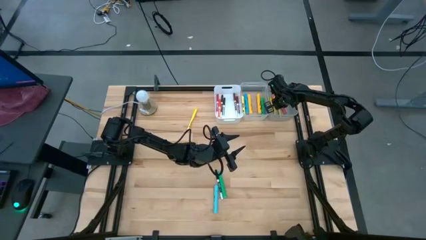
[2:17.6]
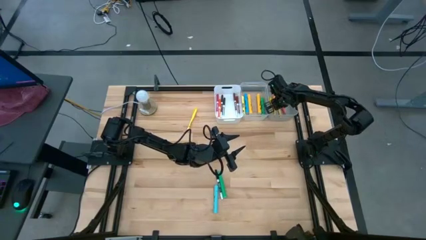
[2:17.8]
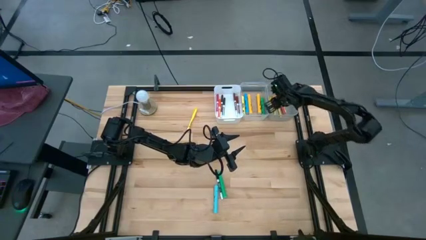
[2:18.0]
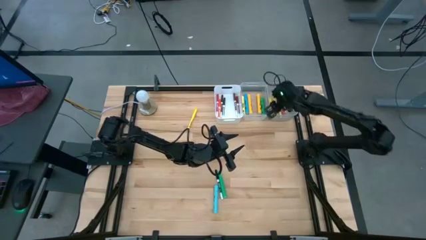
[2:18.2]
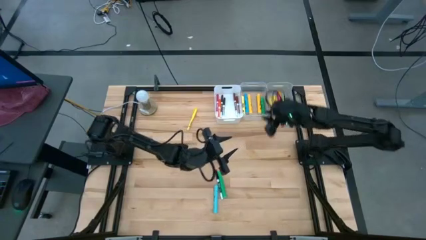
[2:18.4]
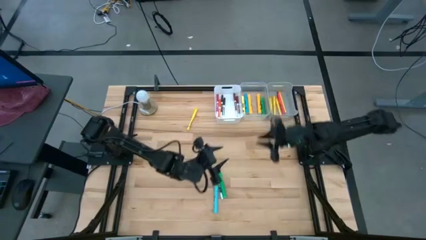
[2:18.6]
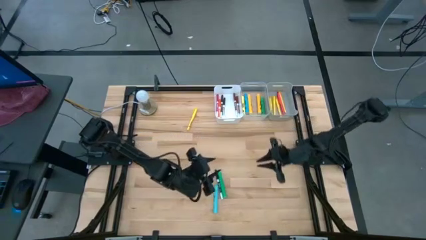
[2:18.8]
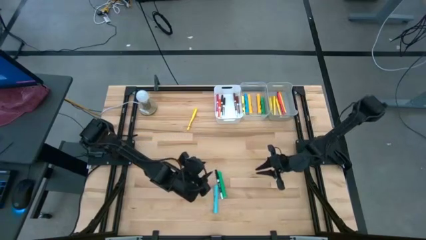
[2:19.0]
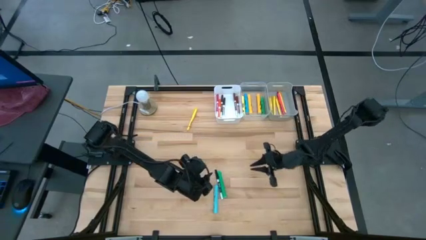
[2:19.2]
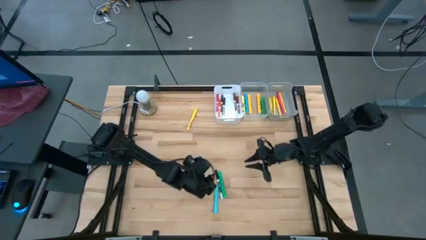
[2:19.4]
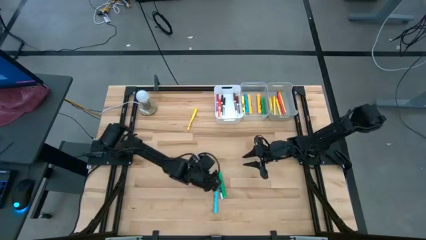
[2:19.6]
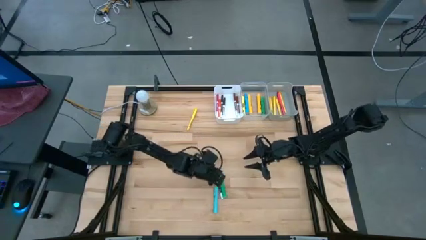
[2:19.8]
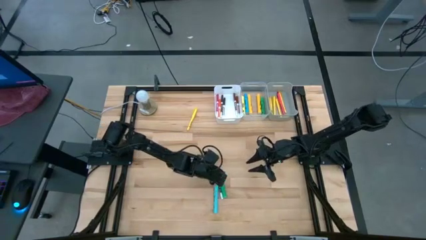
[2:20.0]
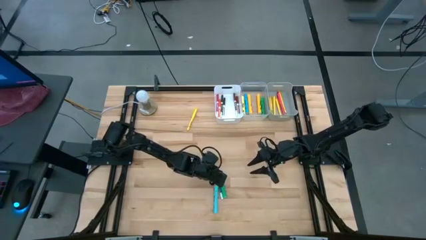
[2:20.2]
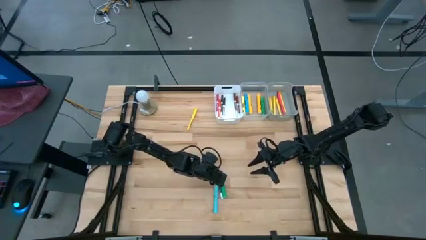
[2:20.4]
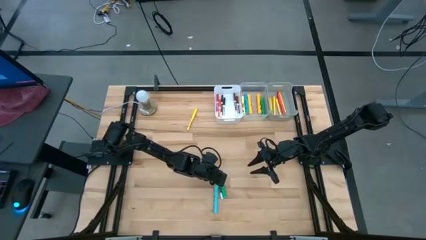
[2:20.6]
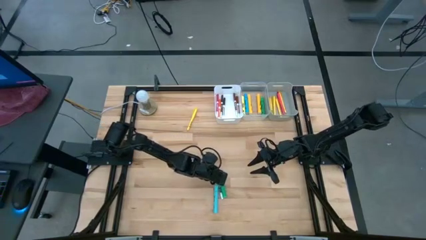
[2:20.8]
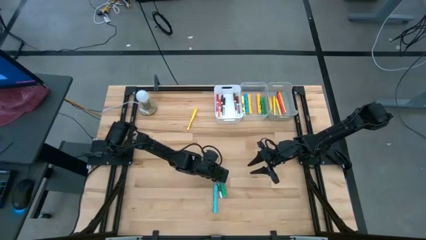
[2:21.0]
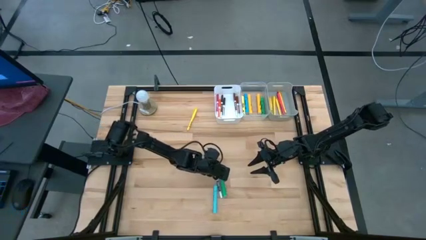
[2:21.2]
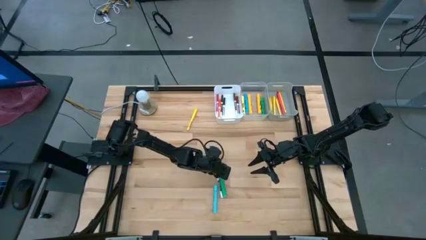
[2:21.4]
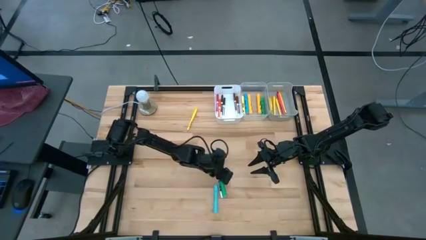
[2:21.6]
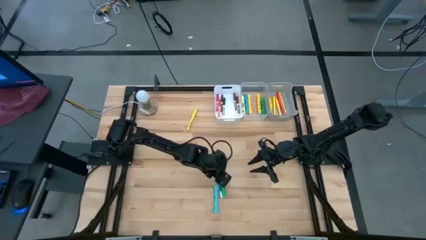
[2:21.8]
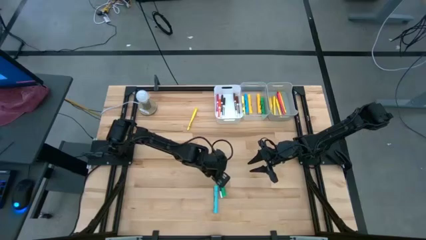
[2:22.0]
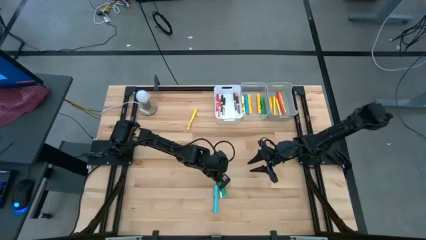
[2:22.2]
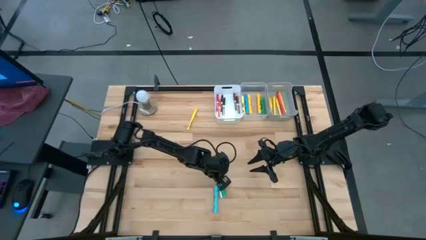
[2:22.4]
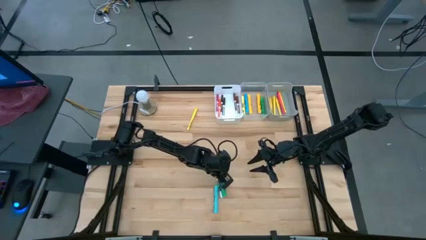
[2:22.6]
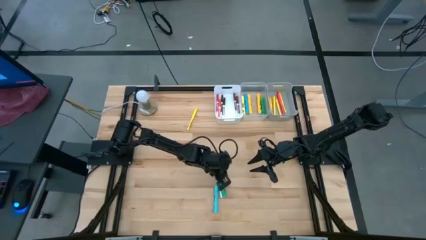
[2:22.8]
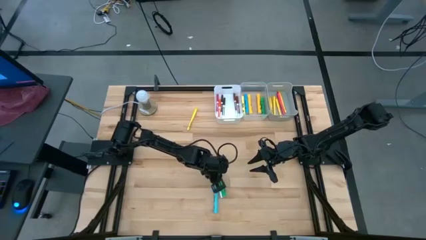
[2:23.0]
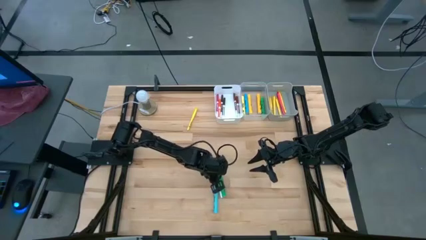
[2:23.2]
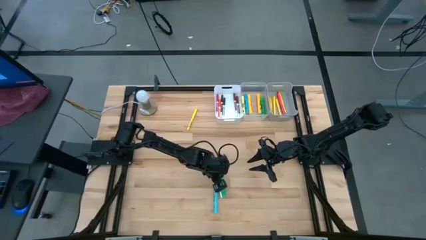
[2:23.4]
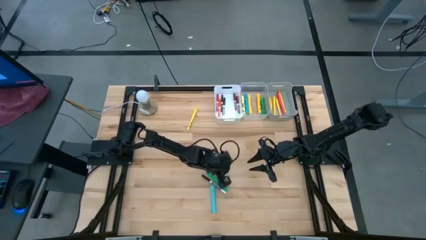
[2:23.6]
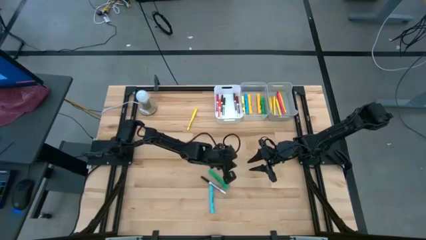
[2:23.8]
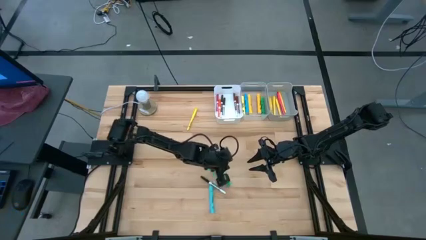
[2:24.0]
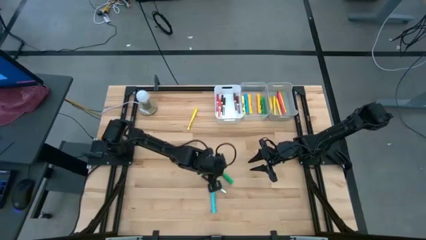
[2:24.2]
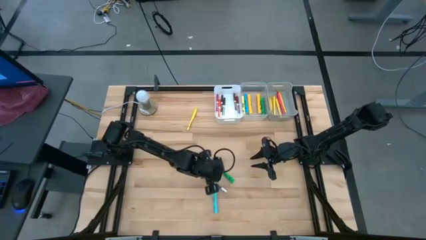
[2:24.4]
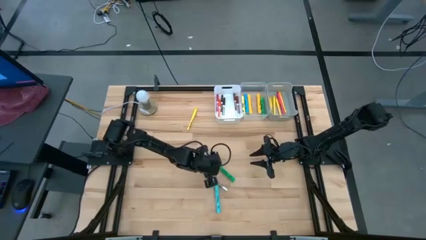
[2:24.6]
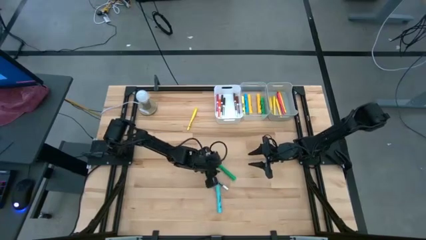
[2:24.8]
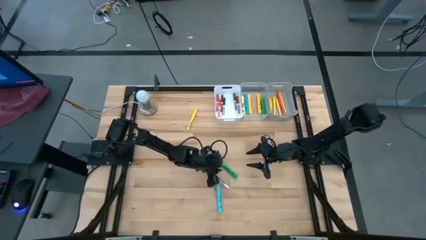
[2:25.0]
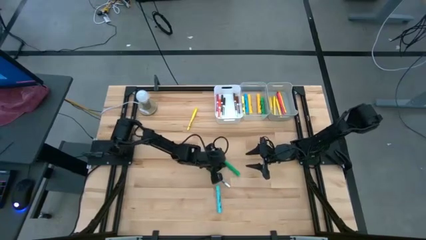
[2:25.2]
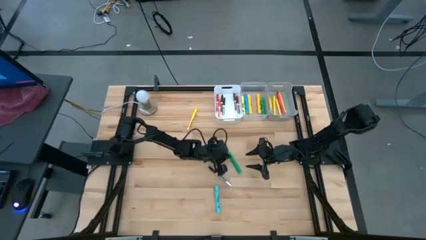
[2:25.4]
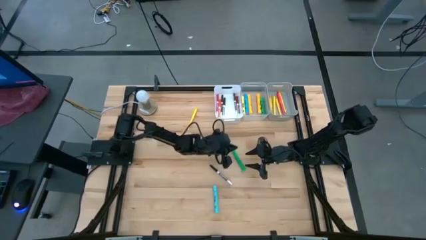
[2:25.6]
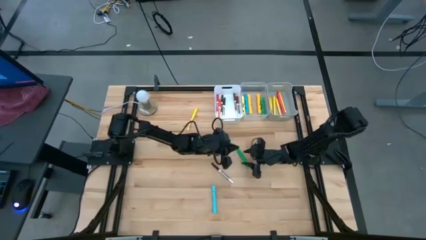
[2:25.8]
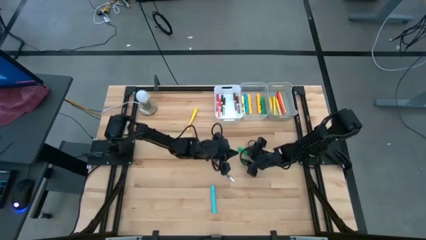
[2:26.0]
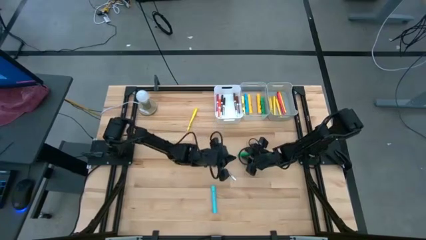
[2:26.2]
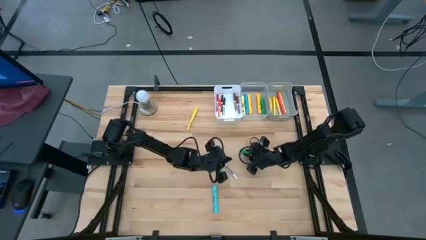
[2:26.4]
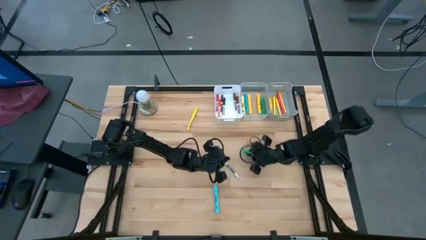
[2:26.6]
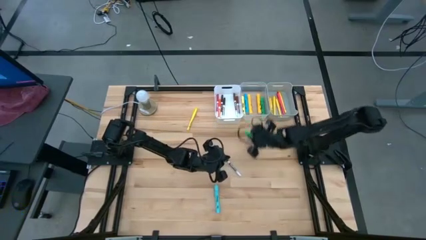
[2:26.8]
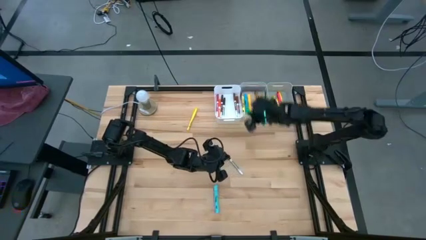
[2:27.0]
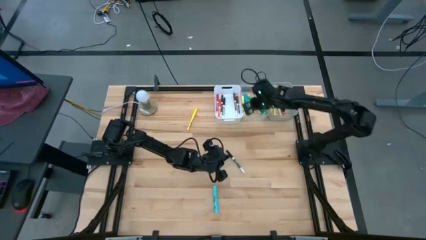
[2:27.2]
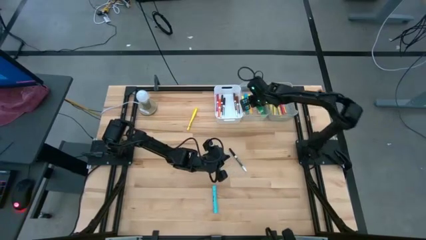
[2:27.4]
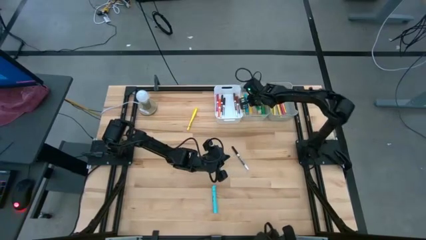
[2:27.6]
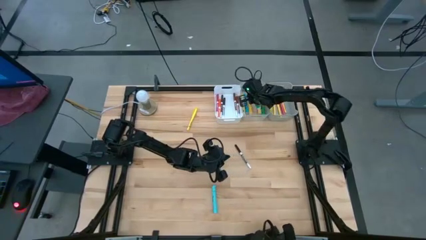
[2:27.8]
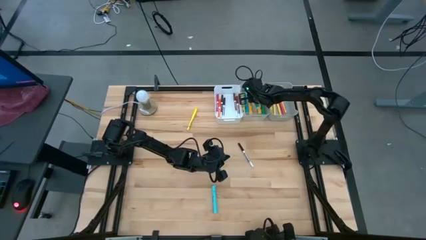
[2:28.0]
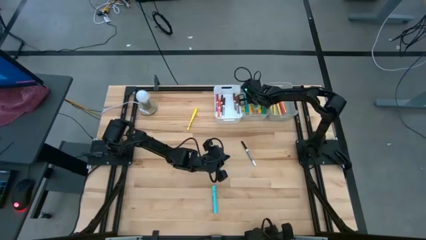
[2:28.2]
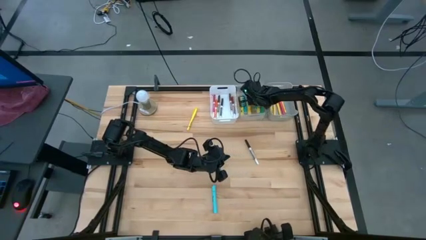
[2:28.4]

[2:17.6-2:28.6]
Task: Pick & Place Markers
Put the green highlighter pen into the transparent bin

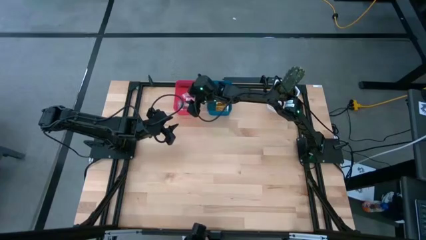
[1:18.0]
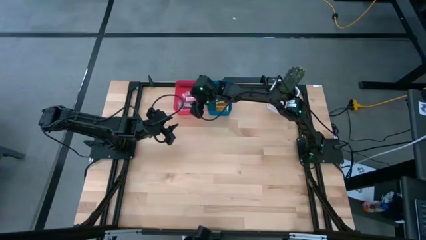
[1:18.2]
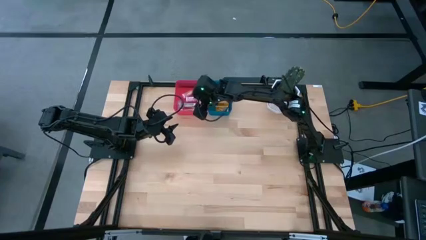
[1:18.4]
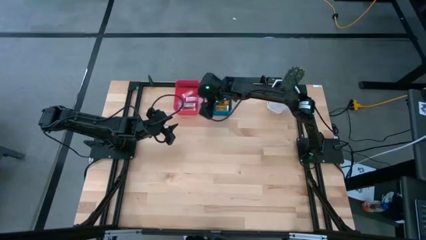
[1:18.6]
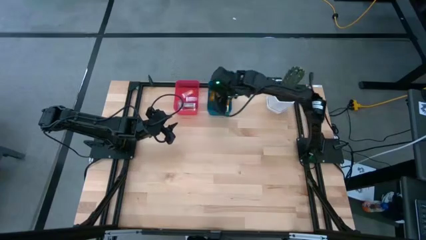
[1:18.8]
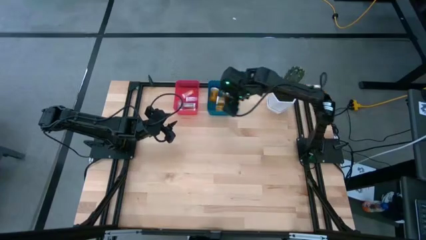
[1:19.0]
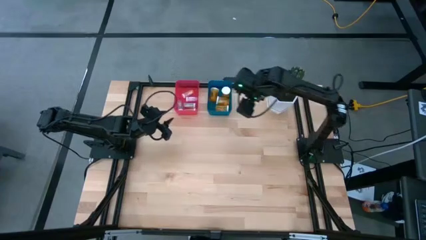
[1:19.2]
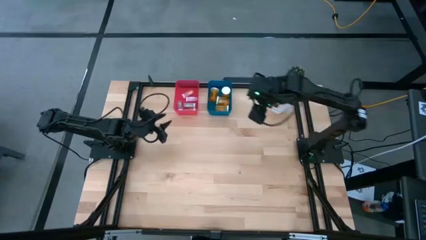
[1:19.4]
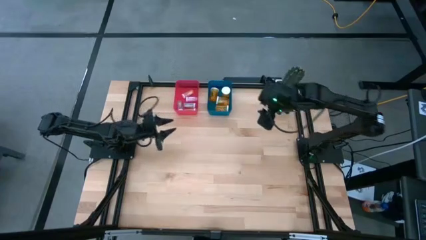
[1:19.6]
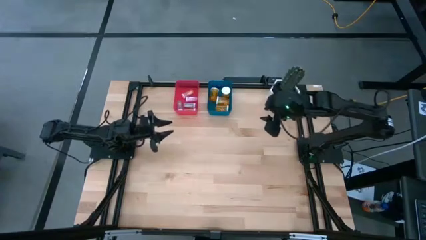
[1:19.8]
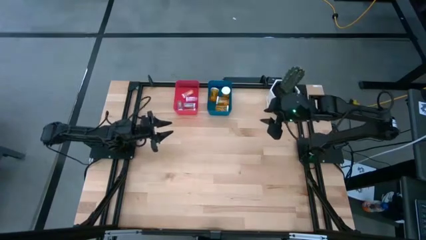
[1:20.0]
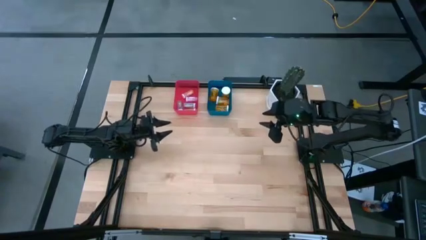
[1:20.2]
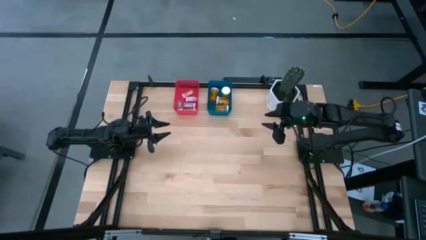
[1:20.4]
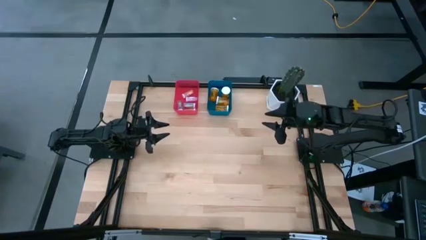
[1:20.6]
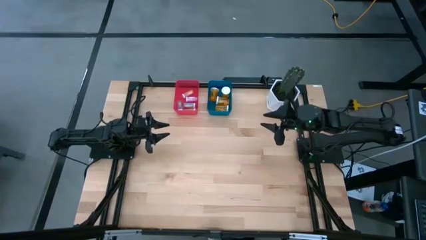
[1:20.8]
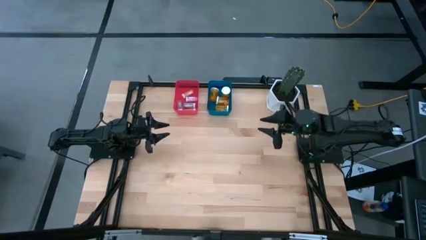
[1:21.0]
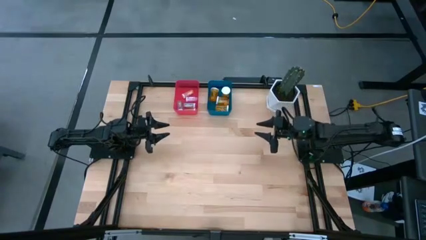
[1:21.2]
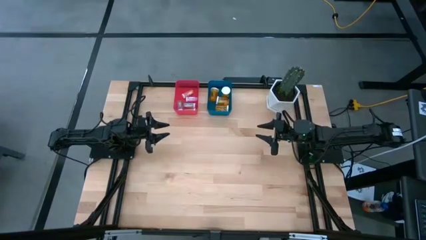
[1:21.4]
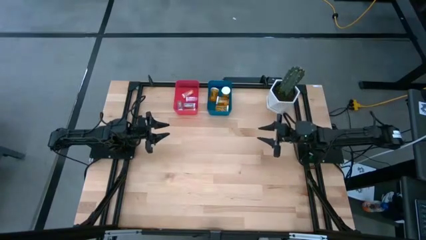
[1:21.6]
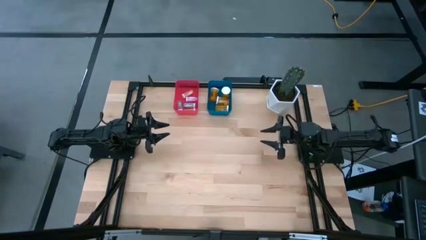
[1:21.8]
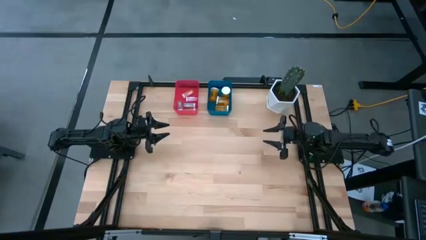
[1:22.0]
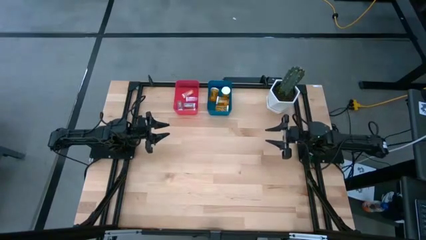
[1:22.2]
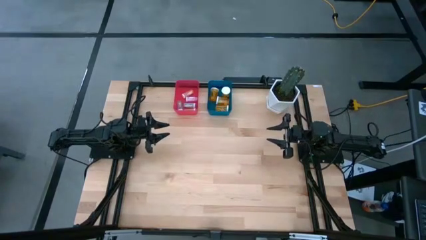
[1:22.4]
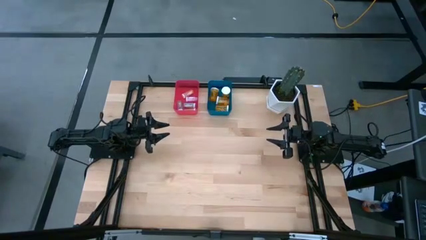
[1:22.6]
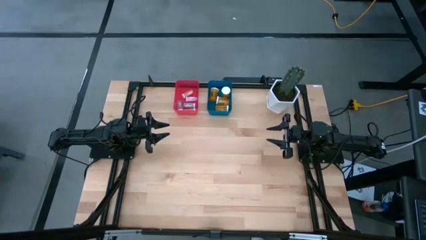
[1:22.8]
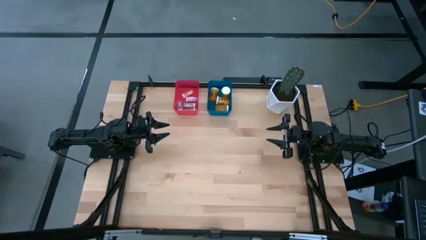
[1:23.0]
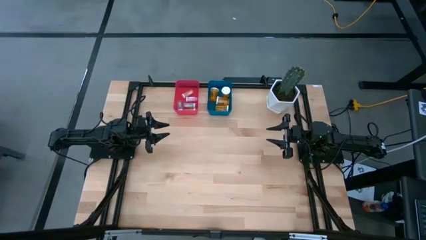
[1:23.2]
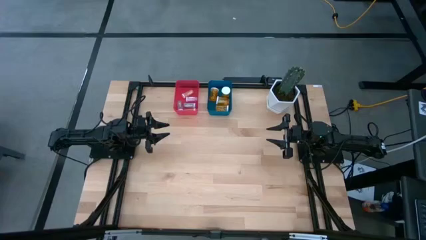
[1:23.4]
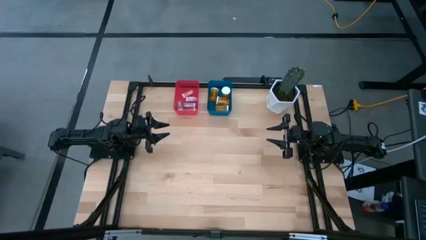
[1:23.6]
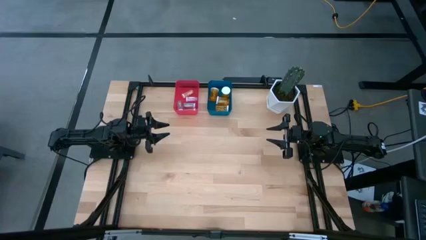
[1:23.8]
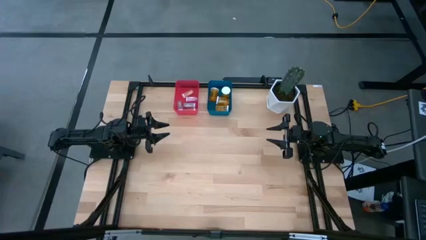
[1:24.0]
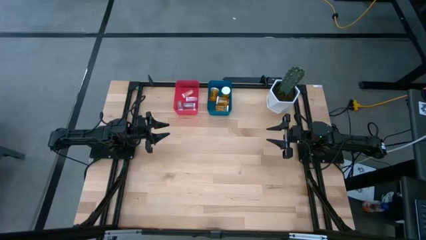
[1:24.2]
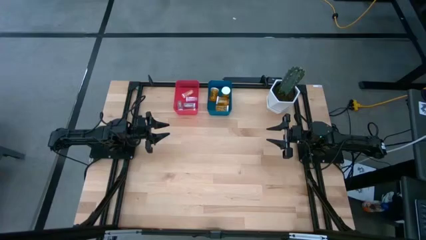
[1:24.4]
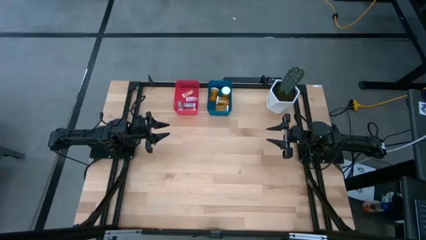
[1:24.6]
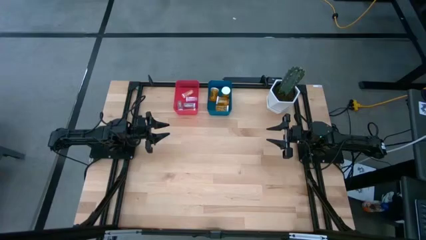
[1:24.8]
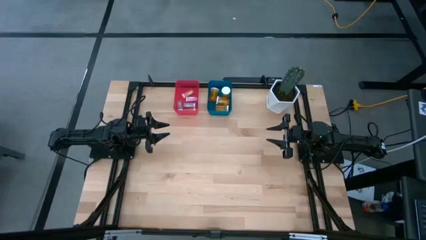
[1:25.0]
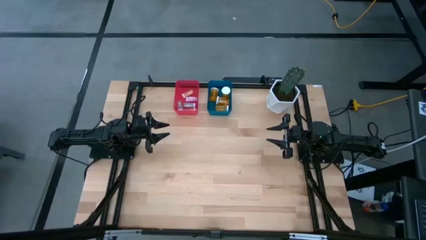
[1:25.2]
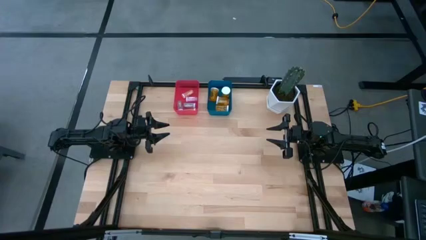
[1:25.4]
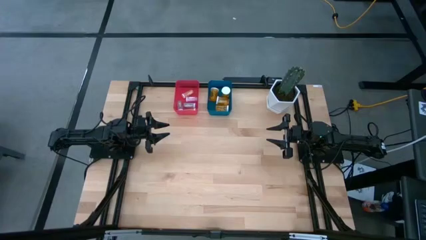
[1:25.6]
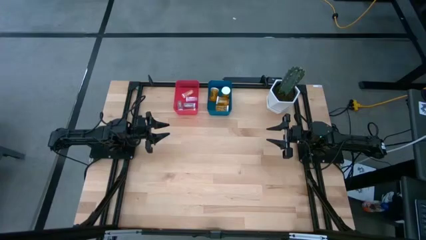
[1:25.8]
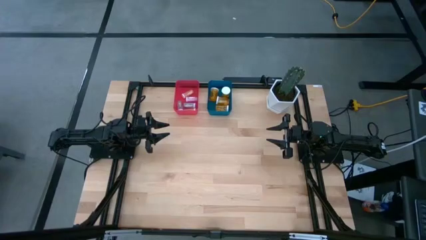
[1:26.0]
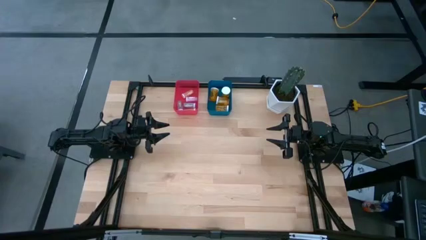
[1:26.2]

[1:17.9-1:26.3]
Task: Pick and place medicine bottles into bin by pill shape (circle, oval)
Return to Home Position
